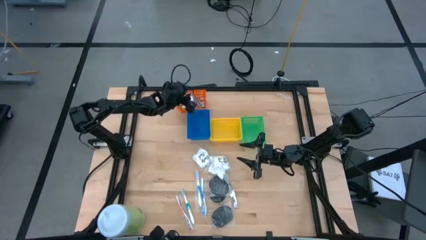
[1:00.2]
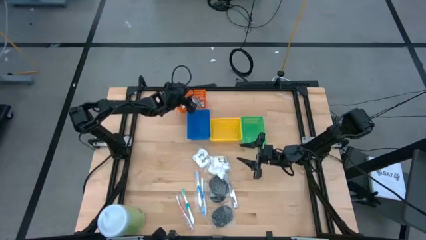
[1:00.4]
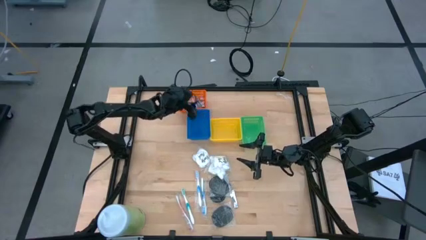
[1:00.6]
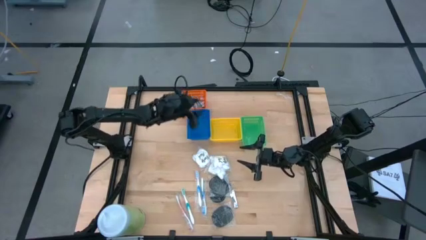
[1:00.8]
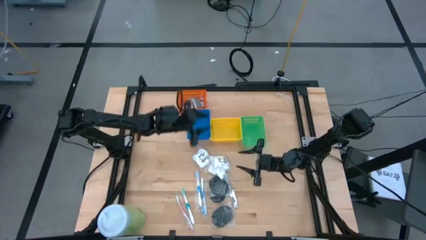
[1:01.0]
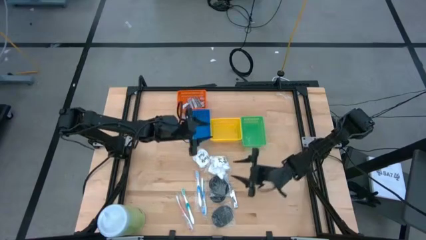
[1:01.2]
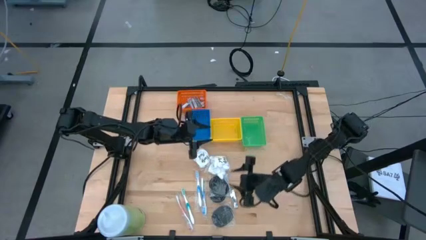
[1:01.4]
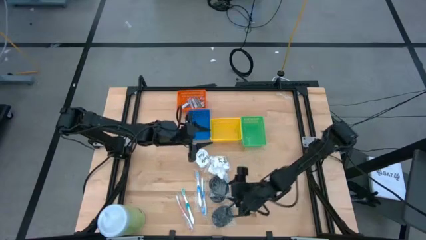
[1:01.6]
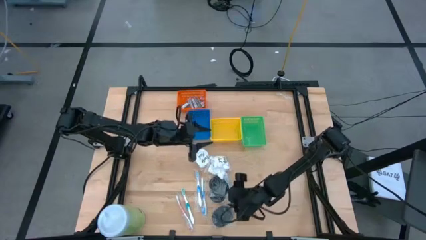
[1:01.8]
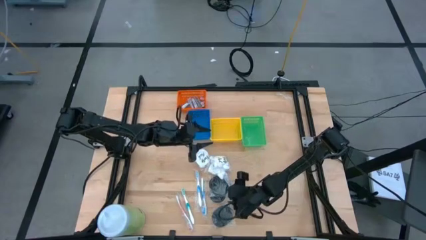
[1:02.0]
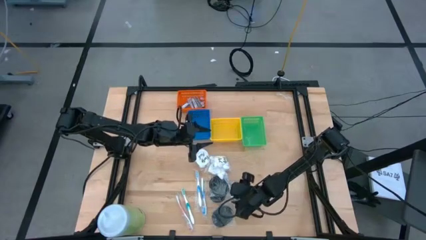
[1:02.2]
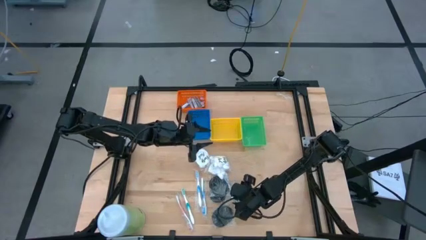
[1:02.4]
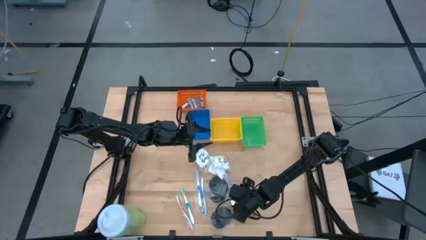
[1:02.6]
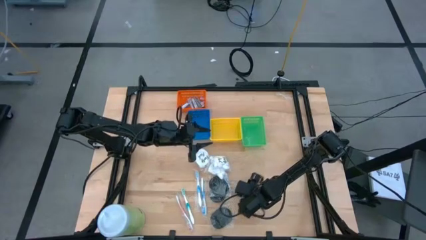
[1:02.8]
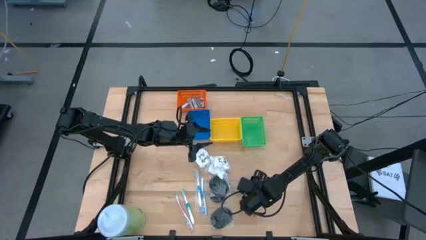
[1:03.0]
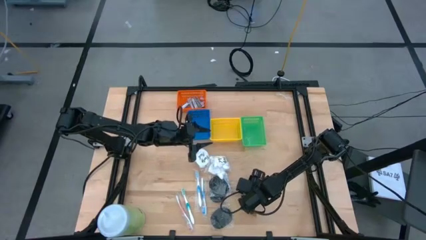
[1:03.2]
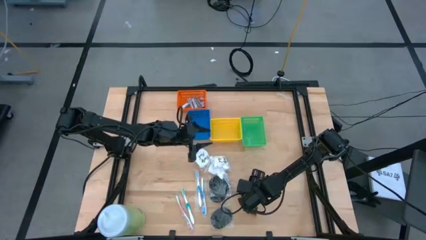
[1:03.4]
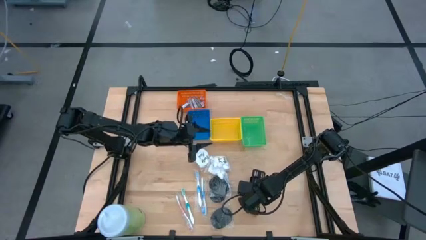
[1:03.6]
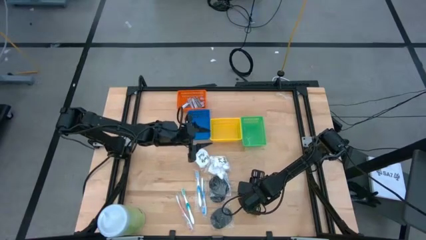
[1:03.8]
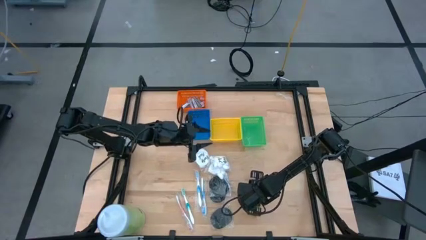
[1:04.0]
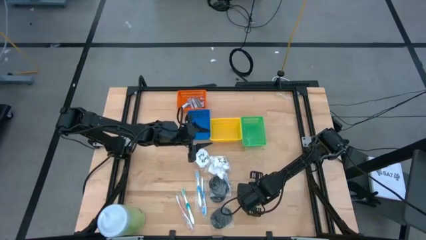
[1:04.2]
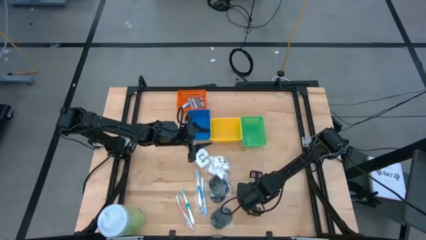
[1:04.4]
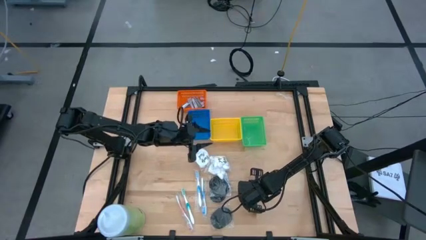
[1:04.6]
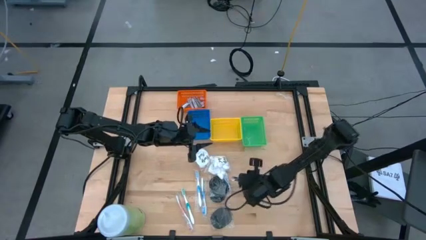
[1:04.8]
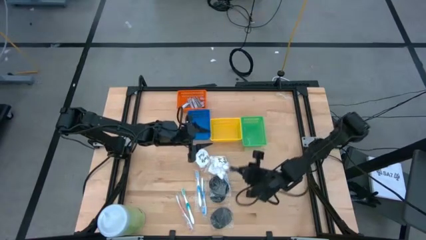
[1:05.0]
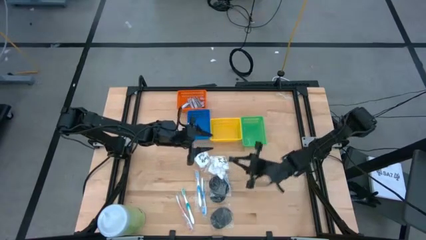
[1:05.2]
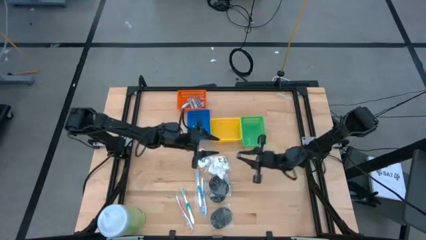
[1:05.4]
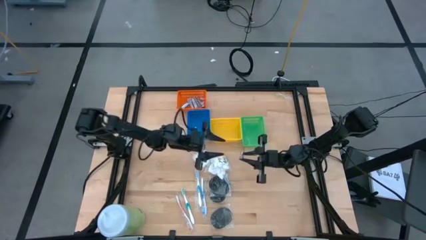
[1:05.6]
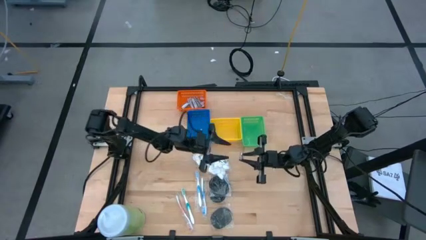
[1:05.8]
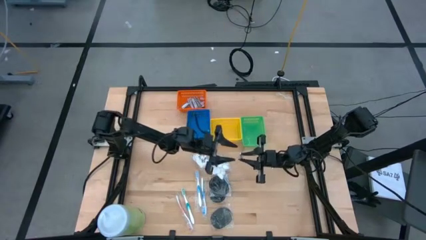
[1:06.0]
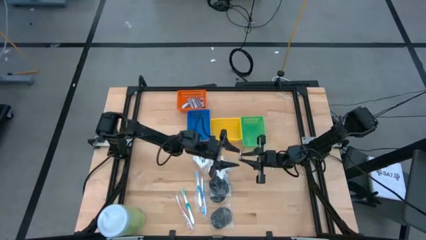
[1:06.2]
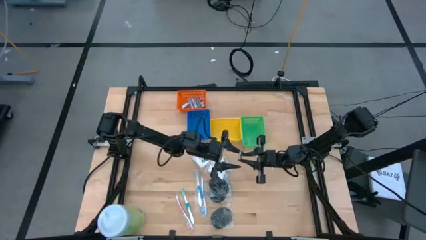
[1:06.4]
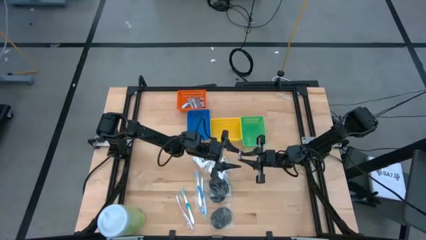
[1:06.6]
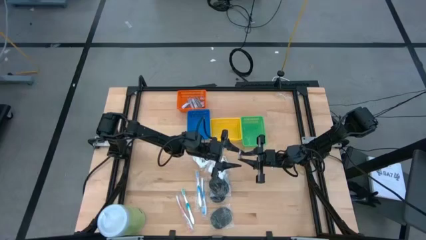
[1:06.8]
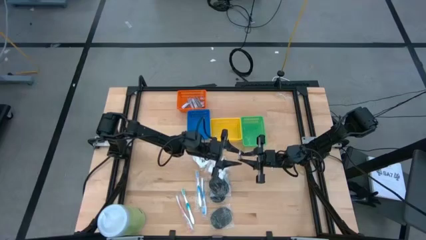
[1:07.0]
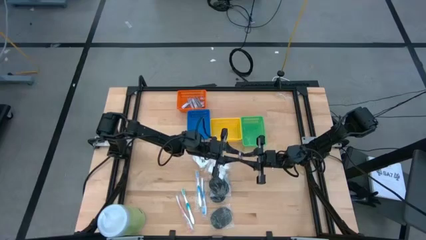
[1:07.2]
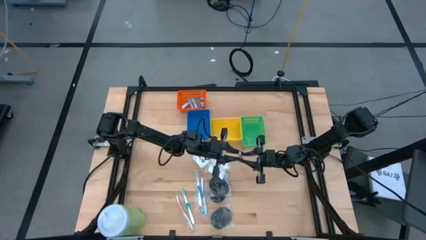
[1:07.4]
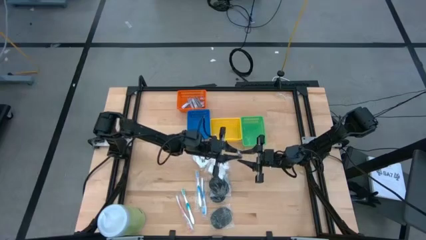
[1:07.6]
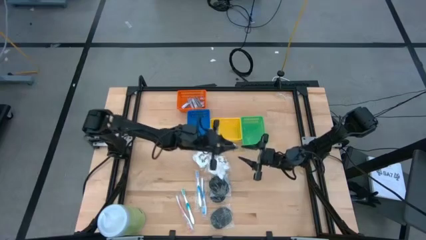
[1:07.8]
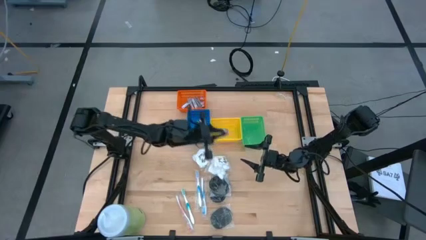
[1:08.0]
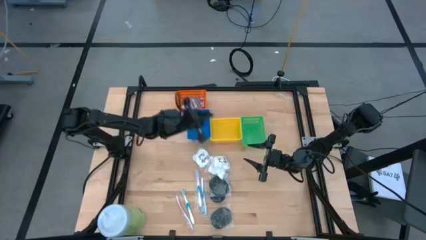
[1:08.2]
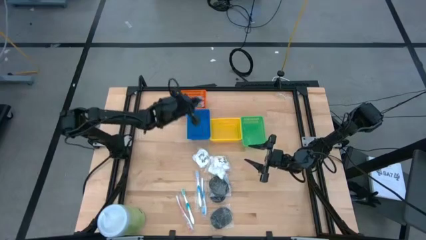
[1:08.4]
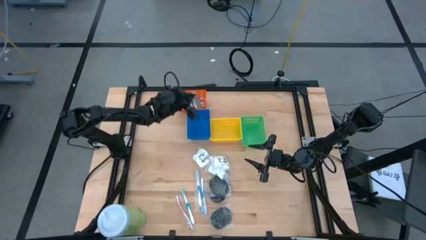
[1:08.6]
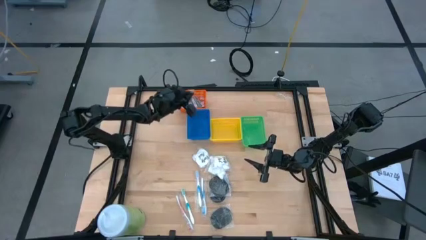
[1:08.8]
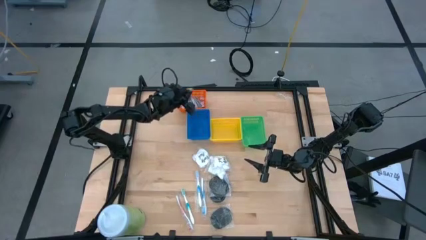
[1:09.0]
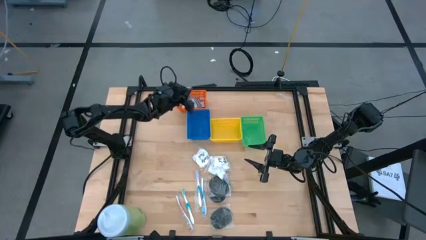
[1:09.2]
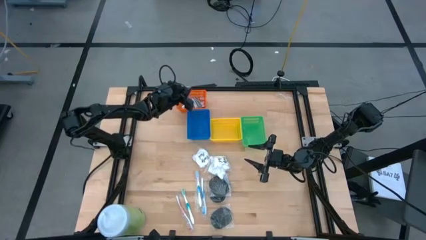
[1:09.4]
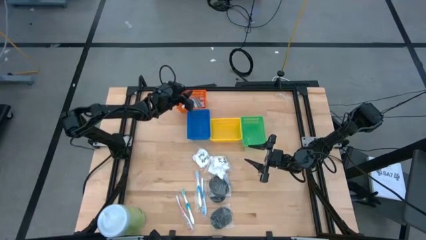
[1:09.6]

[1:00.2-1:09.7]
Task: Pick & Place Travel size toiletries
Put the bottom nail cutter into the orange basket

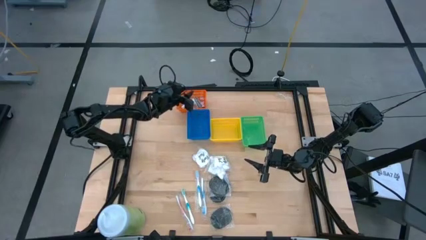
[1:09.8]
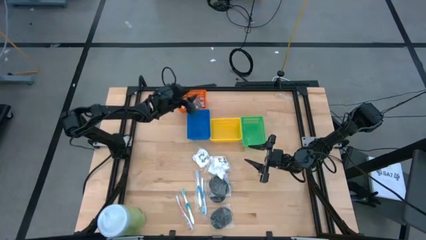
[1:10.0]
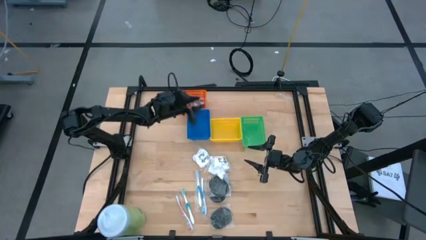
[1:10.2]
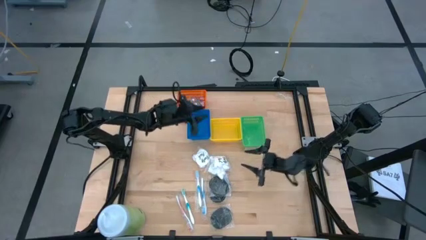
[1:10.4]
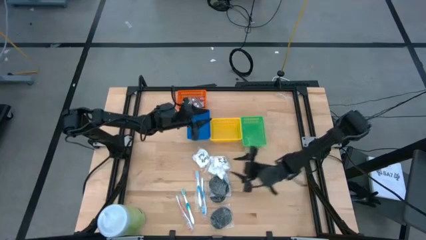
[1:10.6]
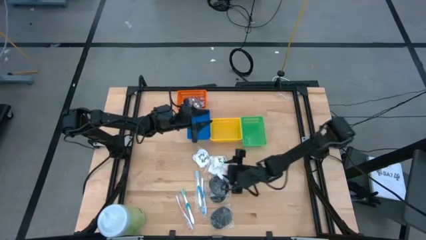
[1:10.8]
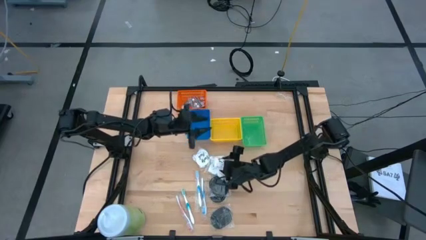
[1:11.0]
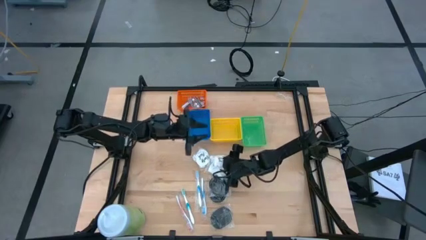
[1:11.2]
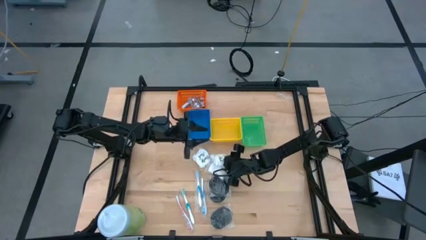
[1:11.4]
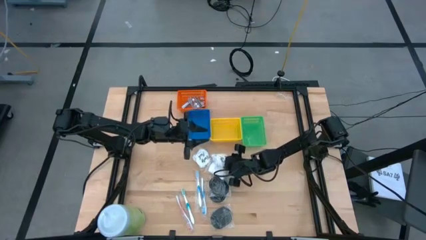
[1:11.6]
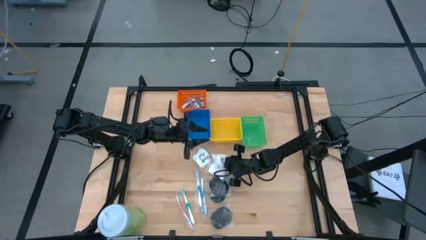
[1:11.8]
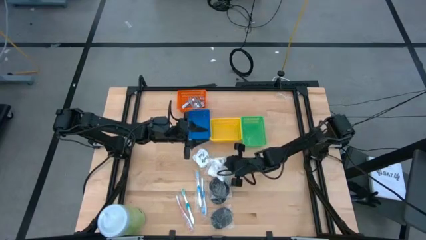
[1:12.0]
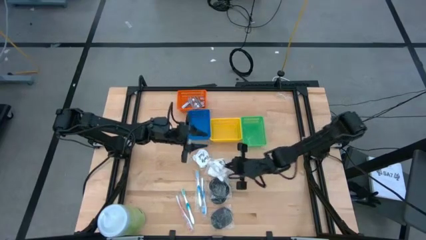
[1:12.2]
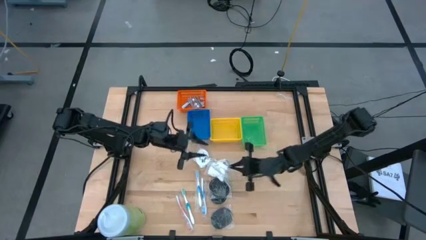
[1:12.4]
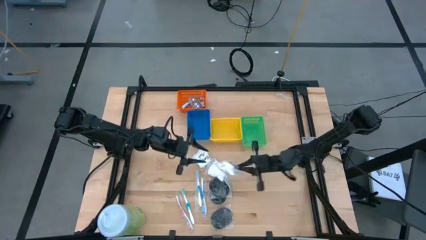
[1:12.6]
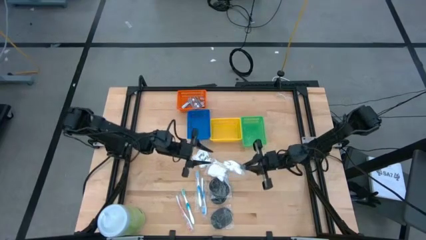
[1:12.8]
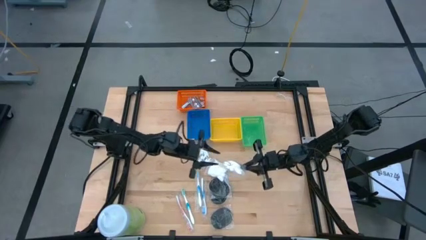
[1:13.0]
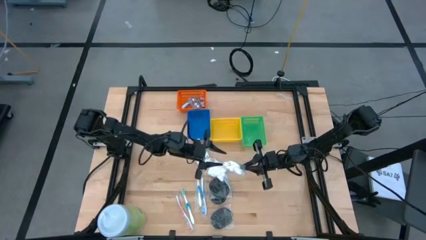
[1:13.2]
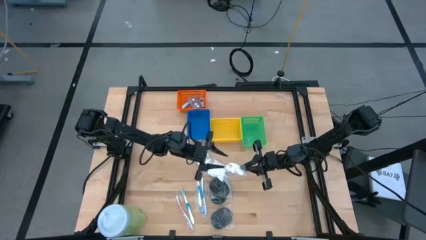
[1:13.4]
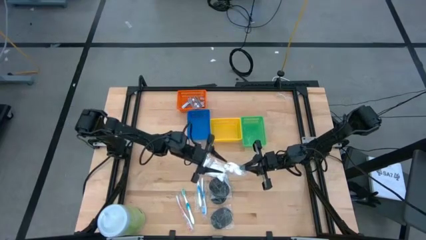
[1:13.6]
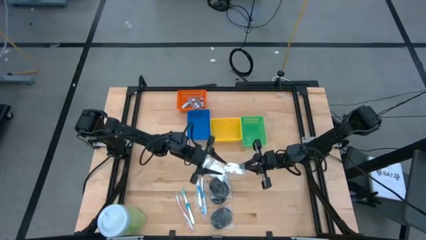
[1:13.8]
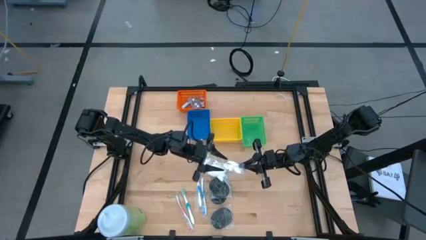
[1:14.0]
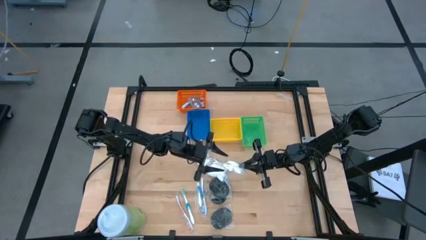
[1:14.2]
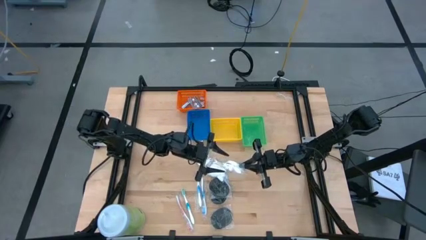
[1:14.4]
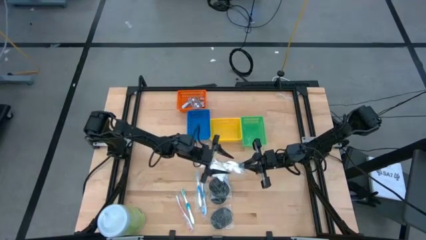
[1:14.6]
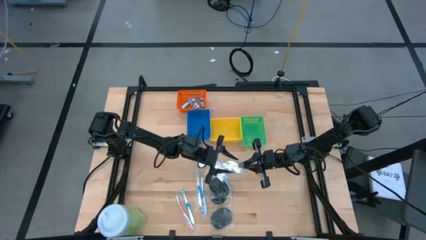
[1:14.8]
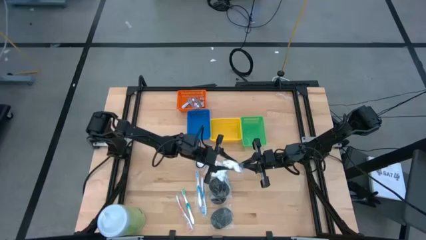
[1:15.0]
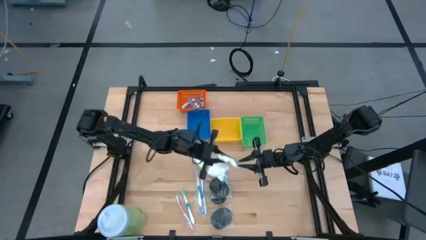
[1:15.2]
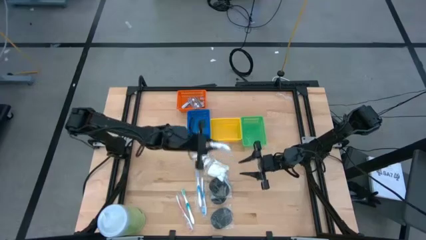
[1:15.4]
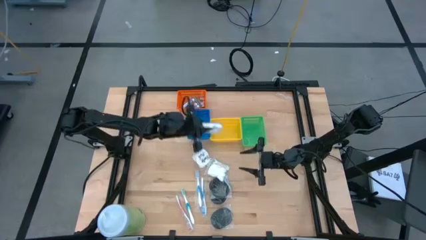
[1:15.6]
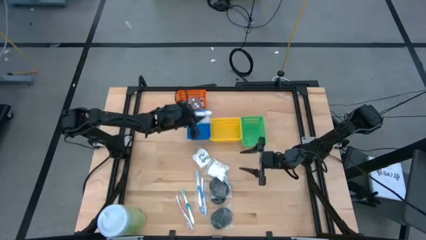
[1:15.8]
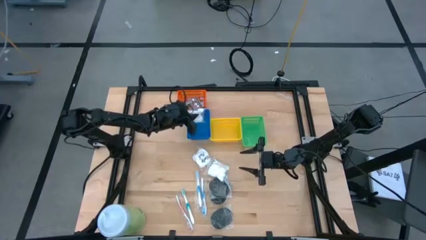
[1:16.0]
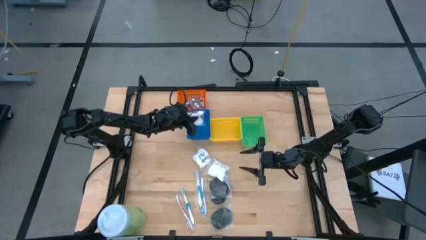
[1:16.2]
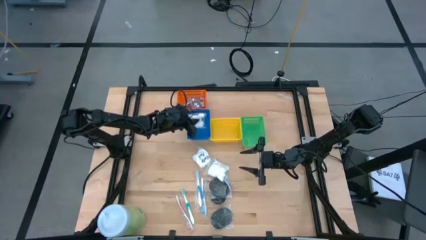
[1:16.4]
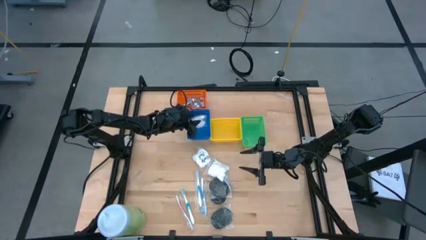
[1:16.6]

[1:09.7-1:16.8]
Put the top right vanity pack into the blue basket
